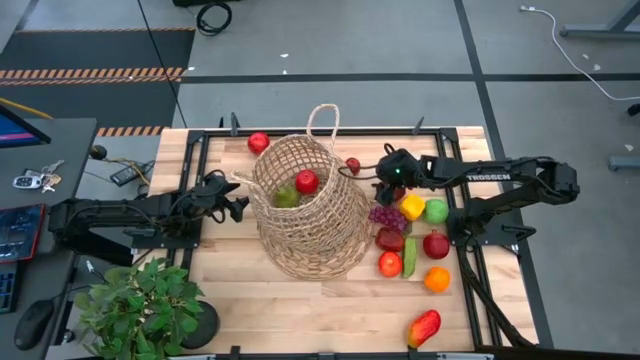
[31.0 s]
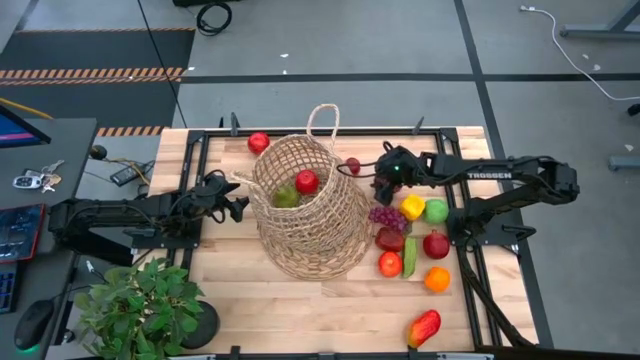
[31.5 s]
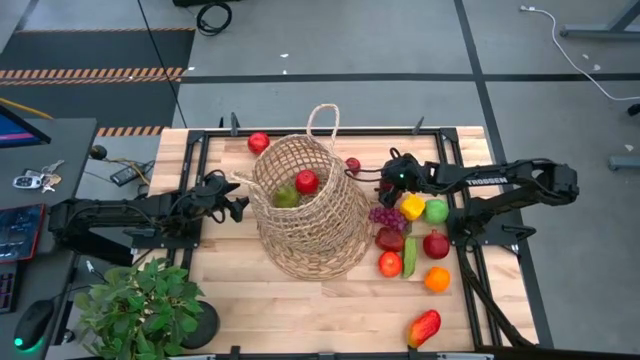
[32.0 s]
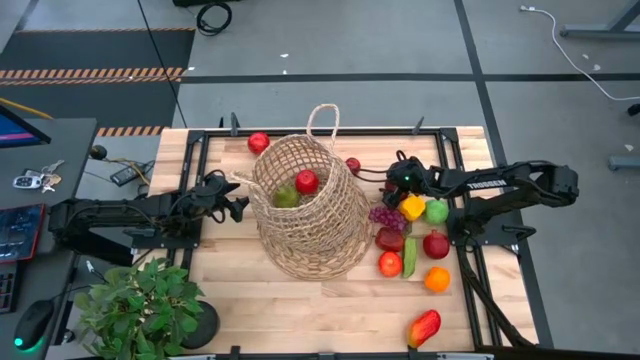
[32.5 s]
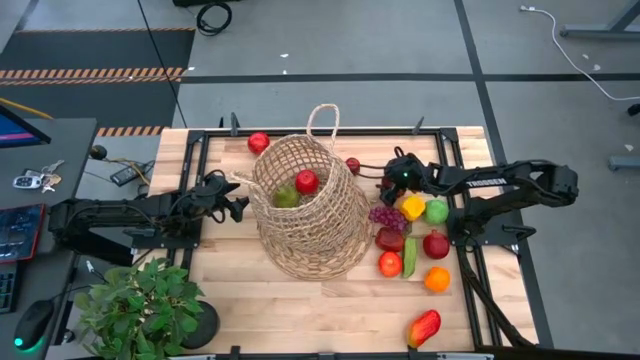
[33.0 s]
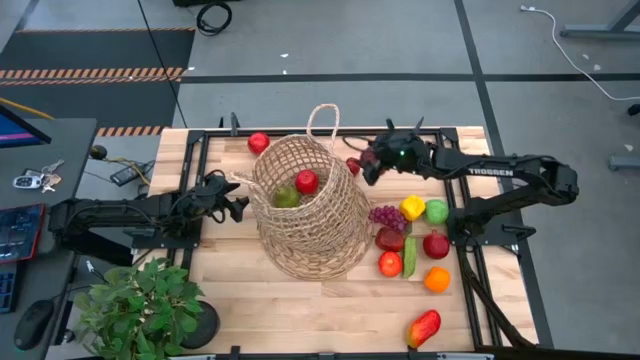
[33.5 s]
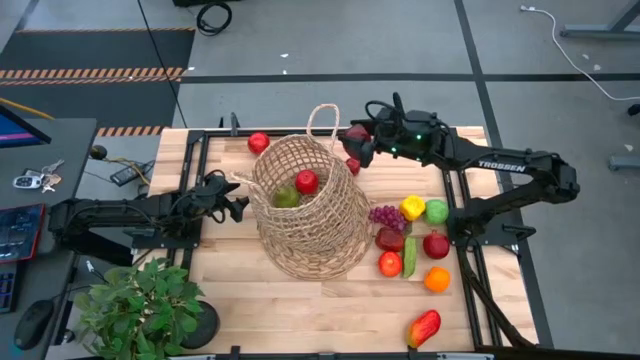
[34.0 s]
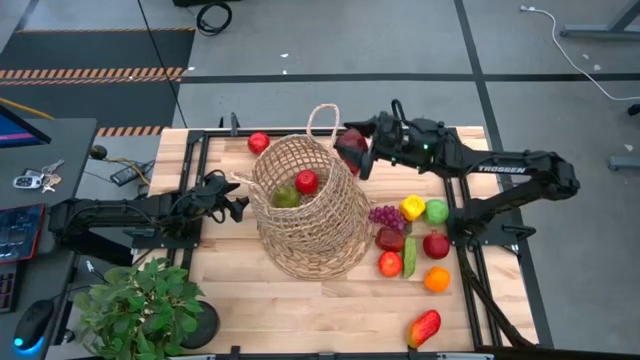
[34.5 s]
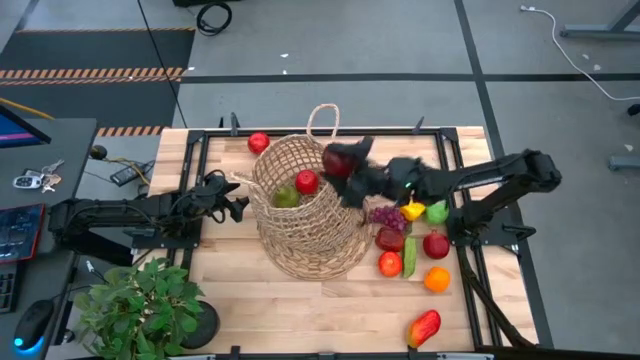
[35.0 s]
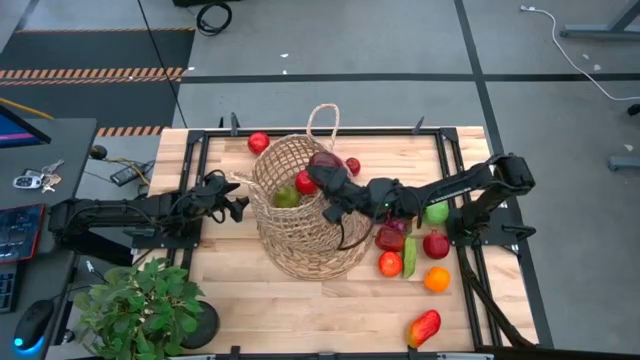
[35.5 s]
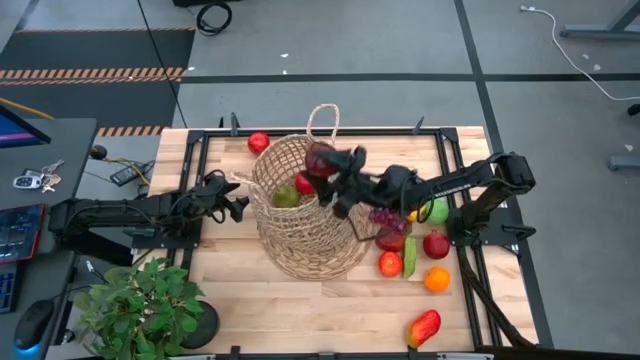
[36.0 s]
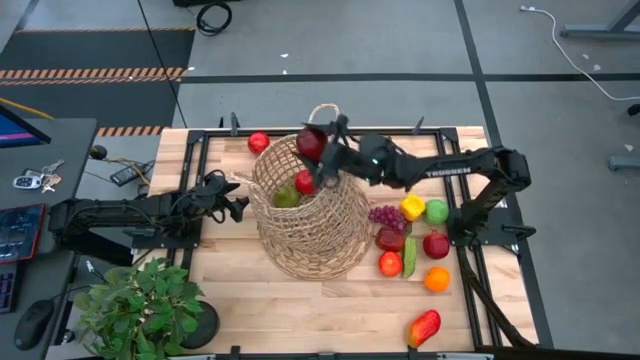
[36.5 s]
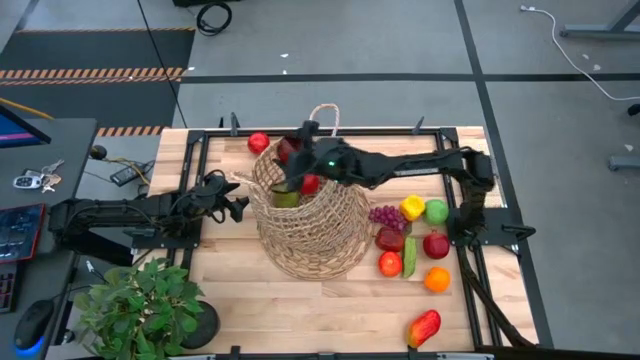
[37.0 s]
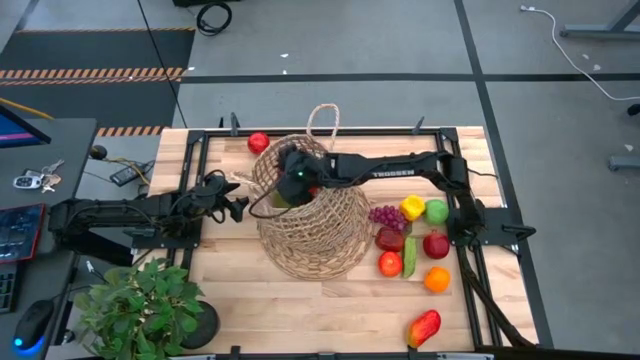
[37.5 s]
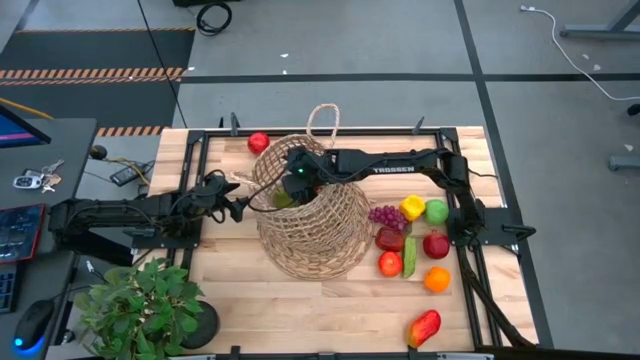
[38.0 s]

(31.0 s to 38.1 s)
Task: Build produce basket
Put the middle dark red apple into the basket

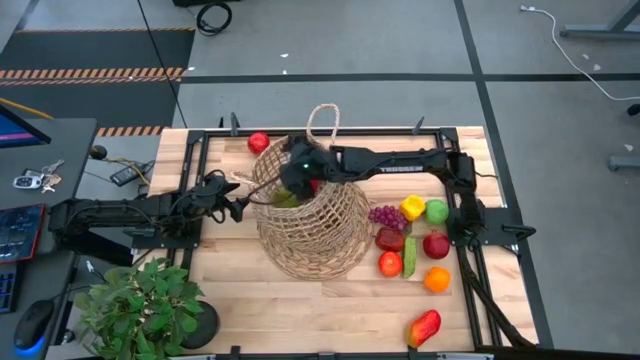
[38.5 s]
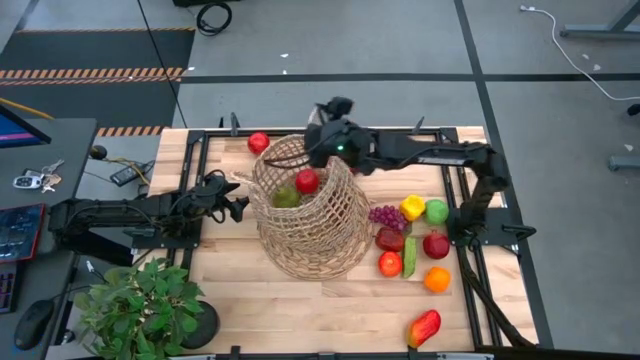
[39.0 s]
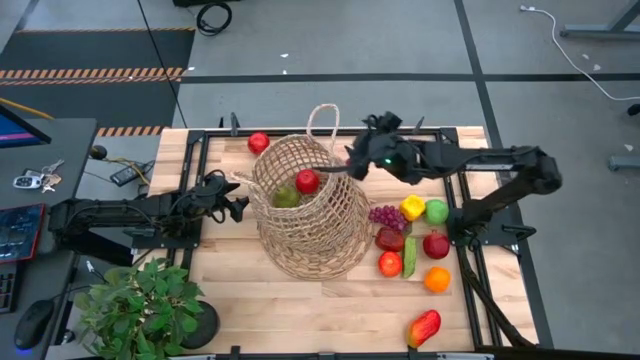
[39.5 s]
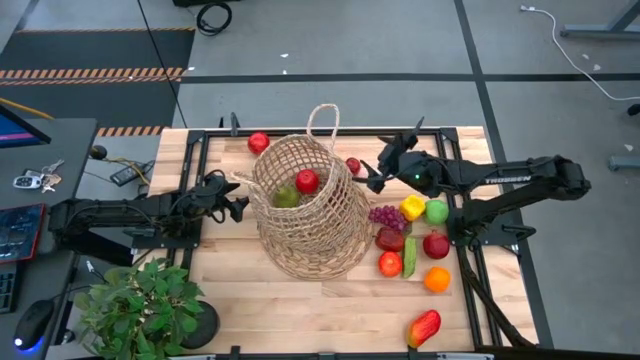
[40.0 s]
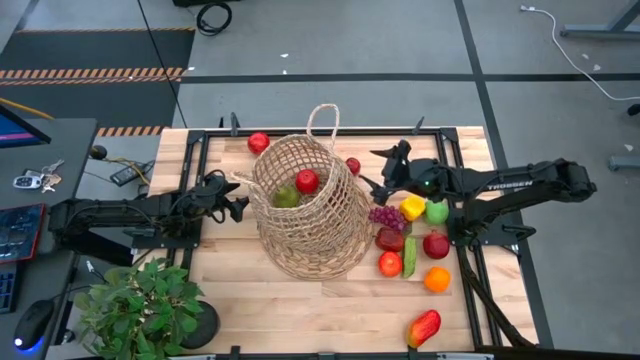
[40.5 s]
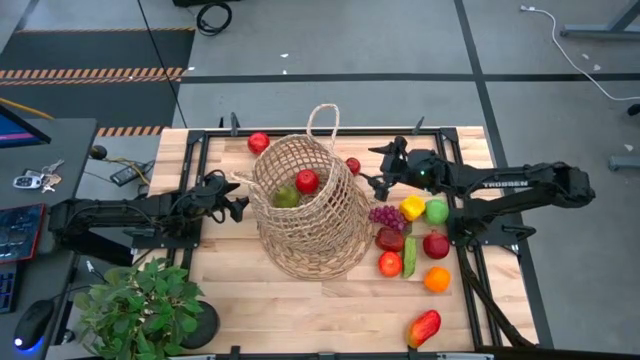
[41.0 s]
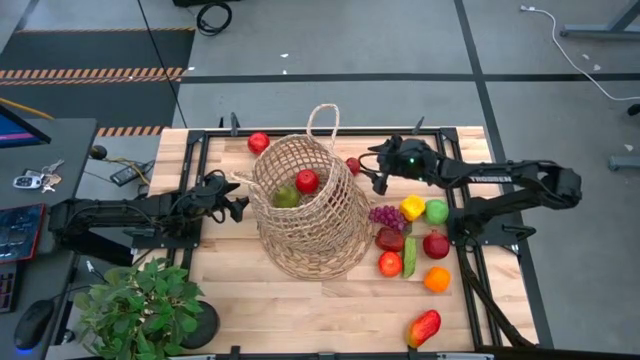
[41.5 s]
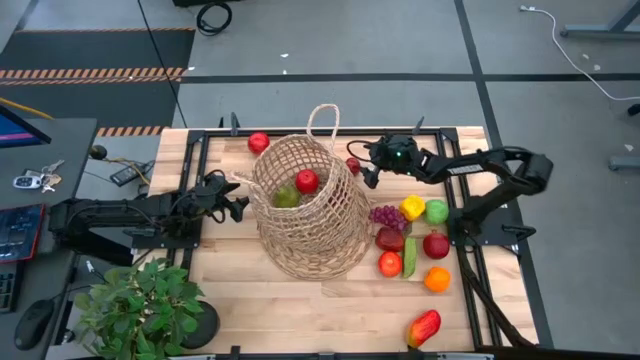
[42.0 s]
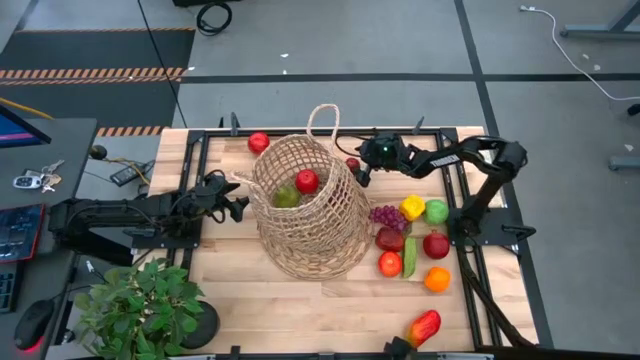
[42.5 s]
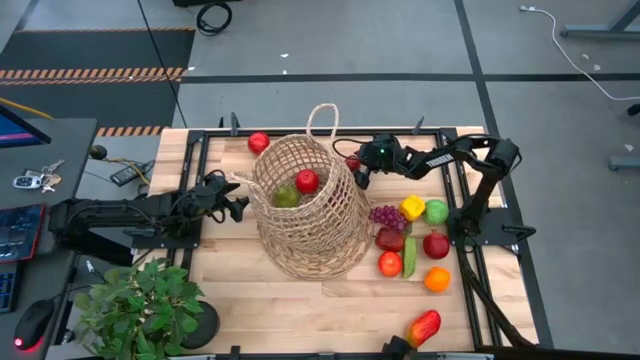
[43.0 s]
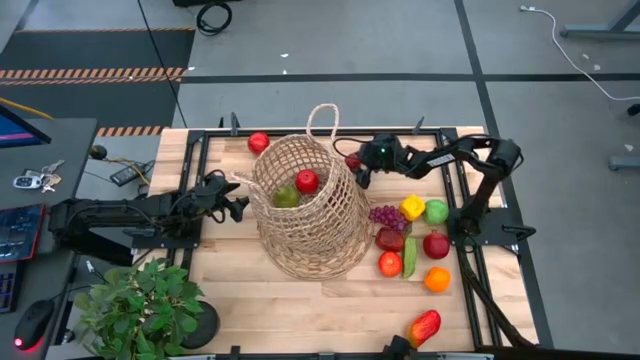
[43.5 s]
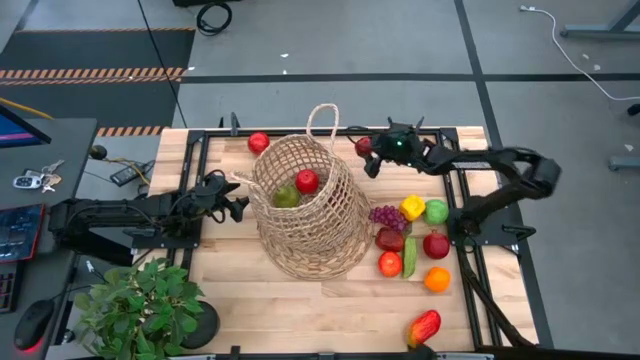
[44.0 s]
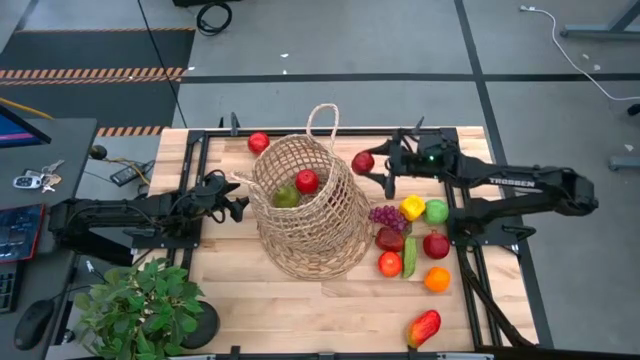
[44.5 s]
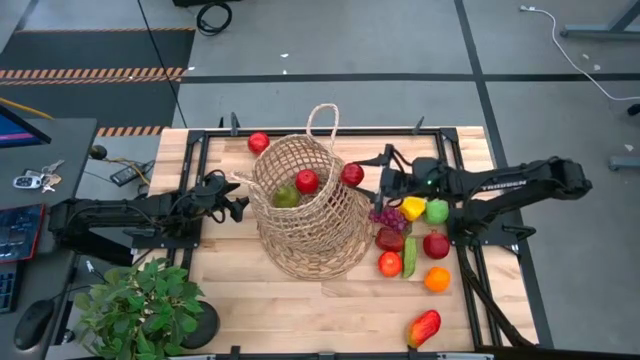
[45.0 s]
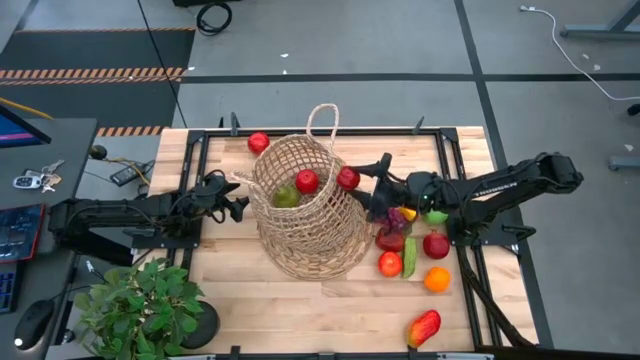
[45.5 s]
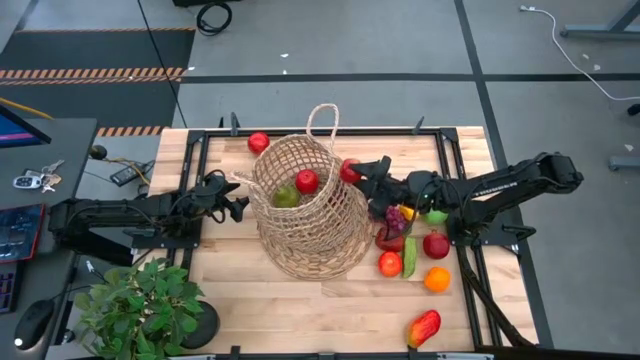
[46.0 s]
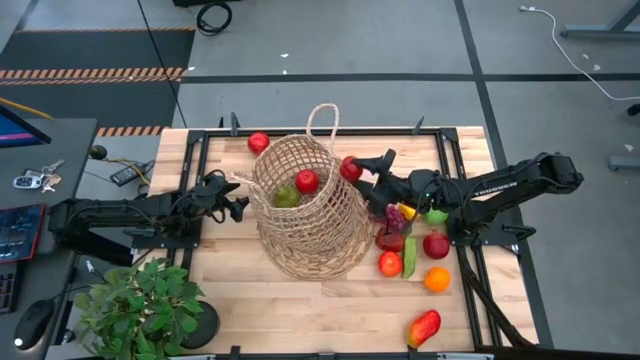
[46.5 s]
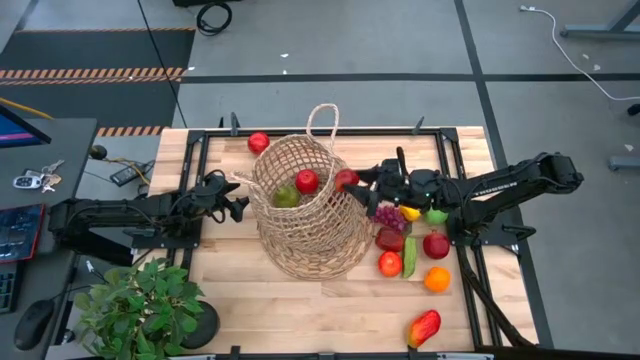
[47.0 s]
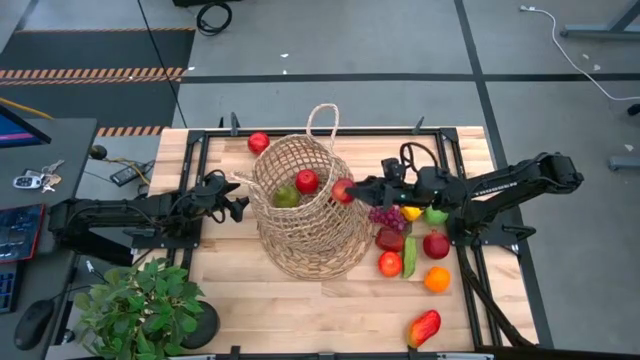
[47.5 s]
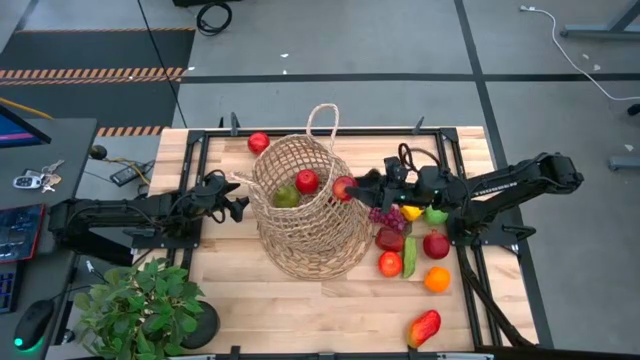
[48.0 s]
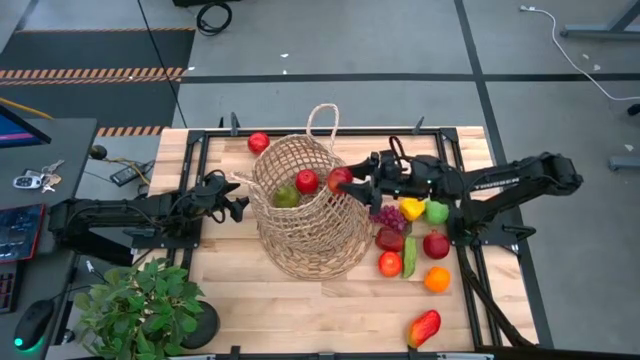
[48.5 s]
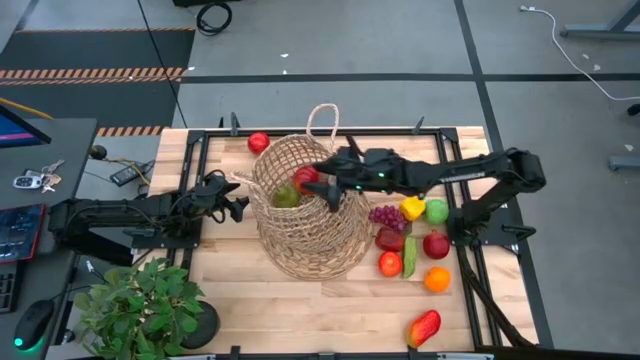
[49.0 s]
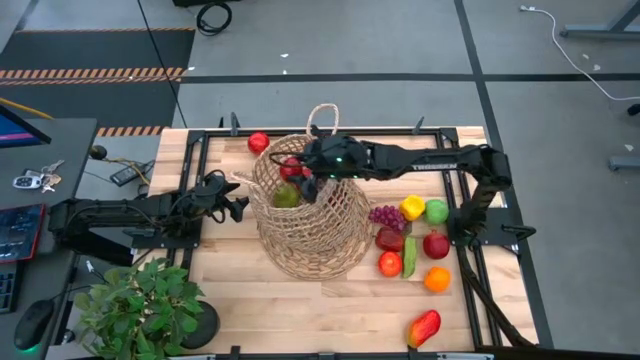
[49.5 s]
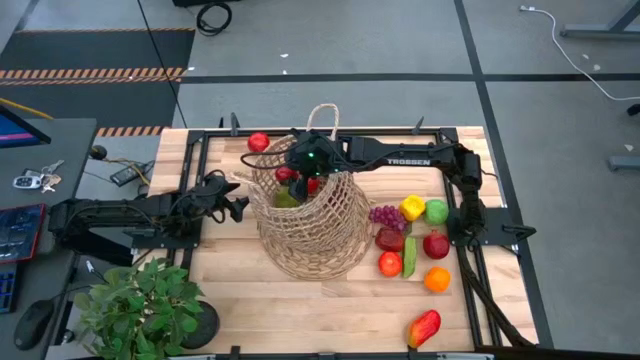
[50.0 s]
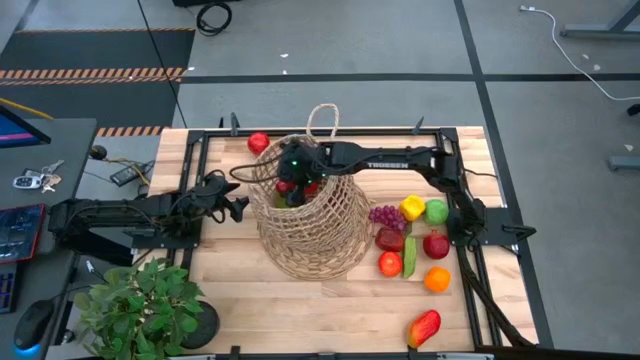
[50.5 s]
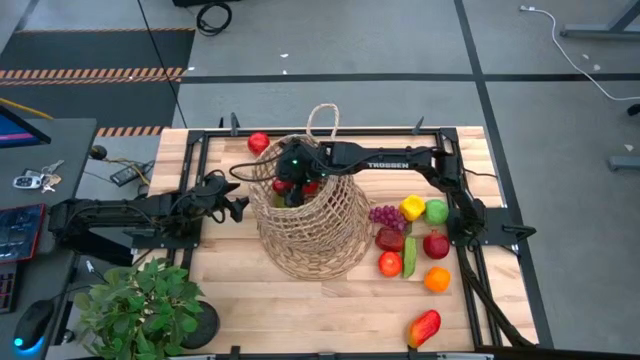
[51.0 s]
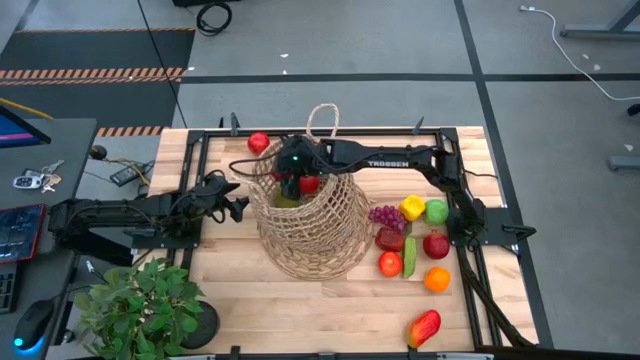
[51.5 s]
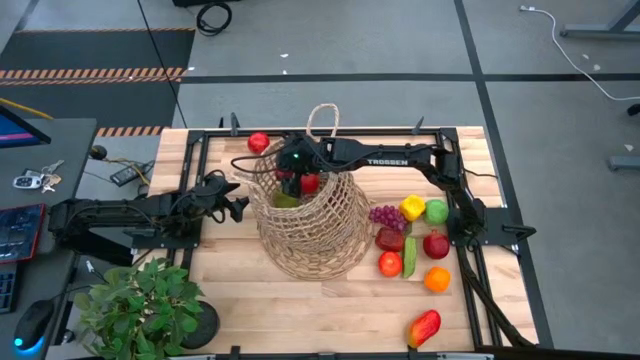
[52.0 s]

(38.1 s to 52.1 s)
Put the top dark red apple into the basket

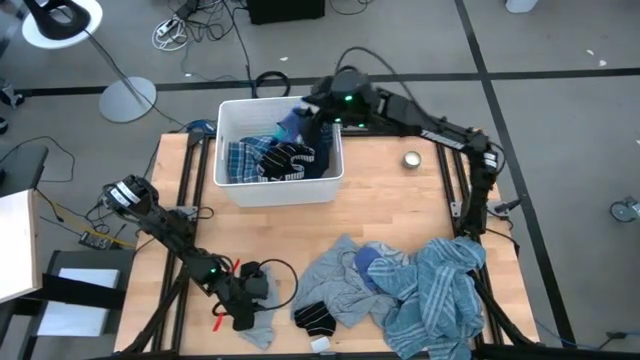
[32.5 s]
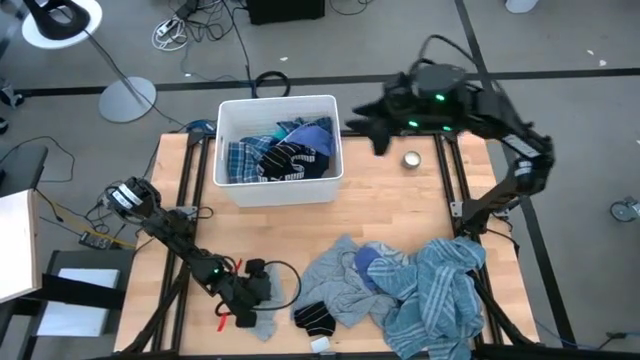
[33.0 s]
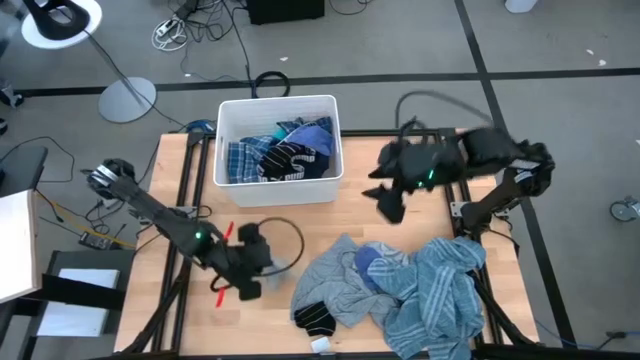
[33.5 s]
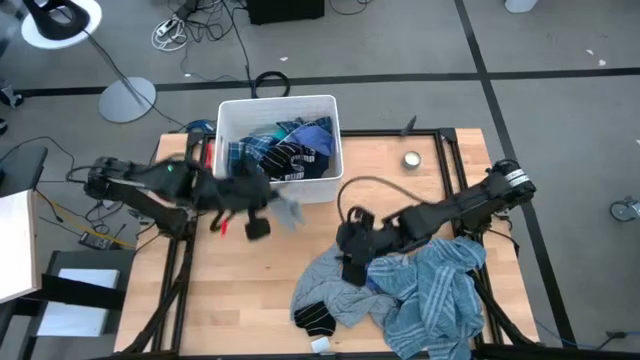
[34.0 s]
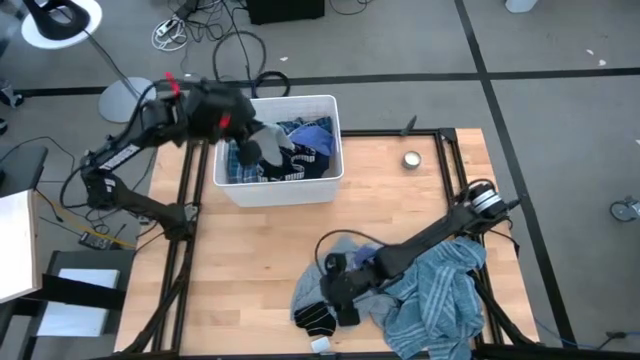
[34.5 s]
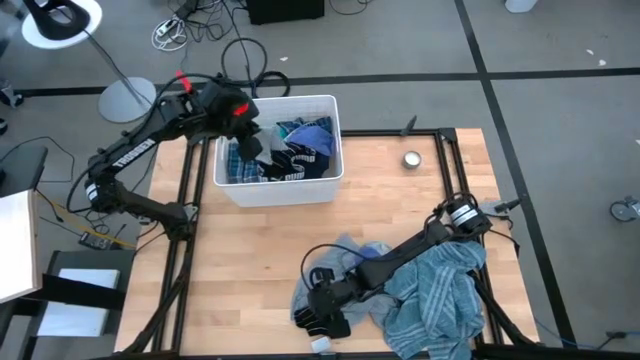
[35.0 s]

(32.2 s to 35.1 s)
Task: Sort clothes
Put the gray sock into the white laundry bin
